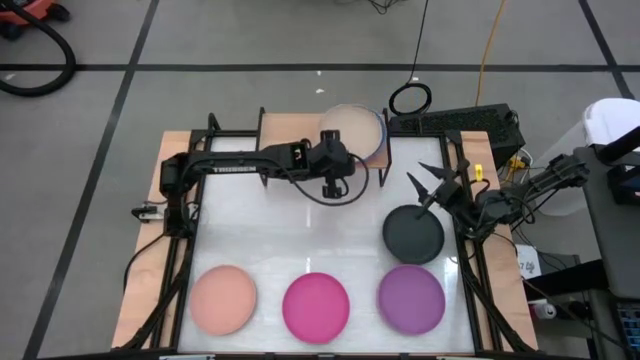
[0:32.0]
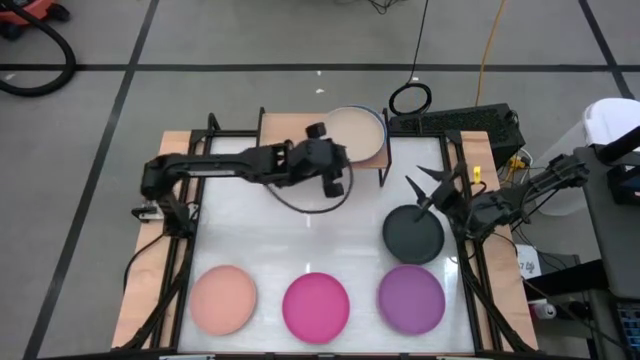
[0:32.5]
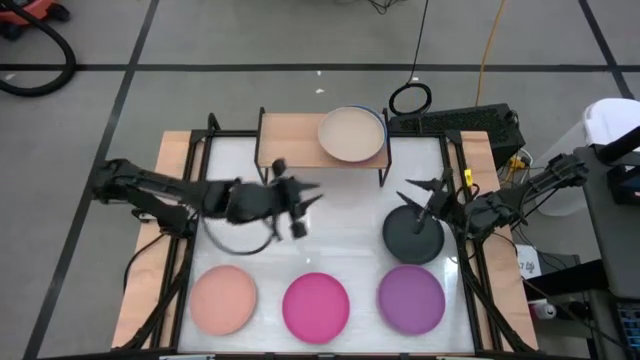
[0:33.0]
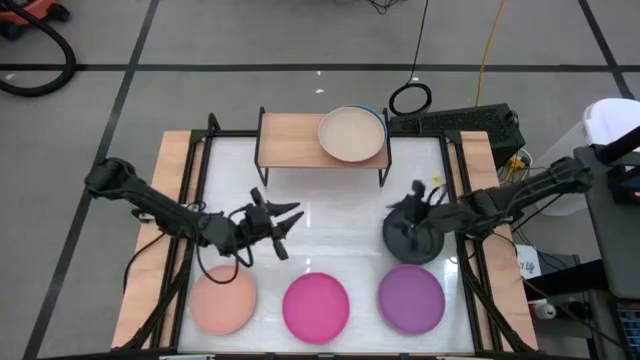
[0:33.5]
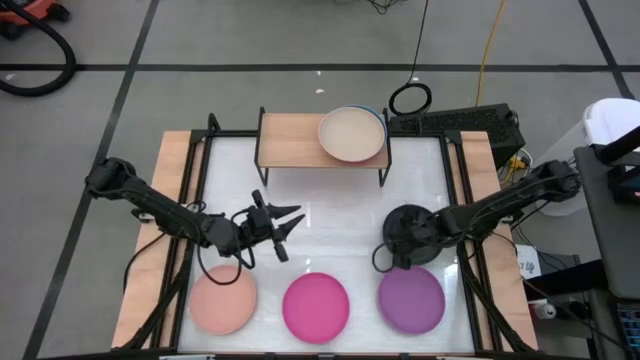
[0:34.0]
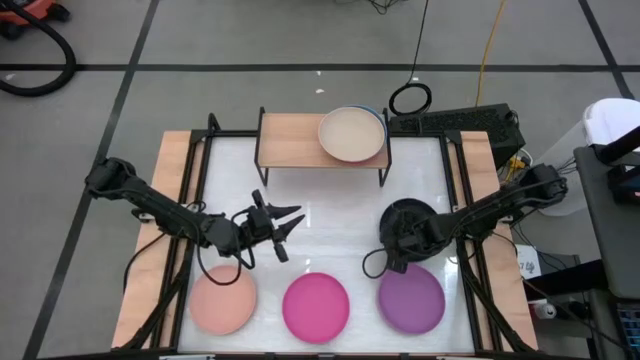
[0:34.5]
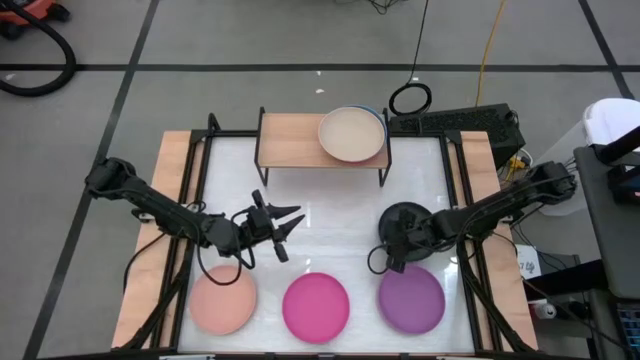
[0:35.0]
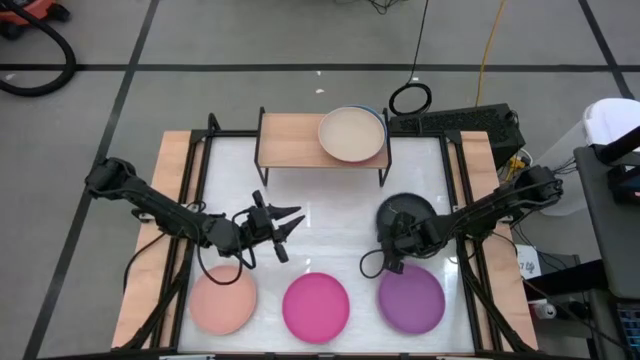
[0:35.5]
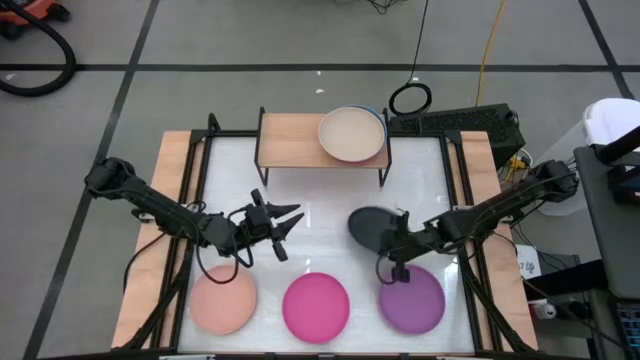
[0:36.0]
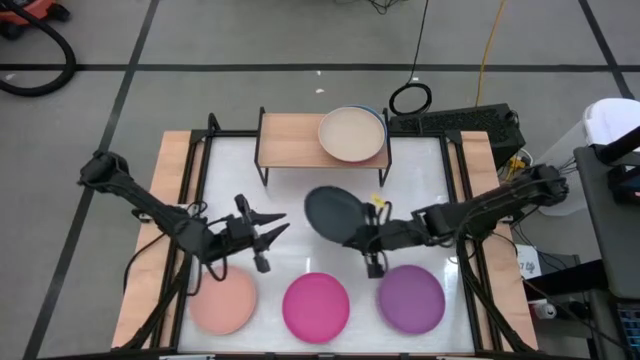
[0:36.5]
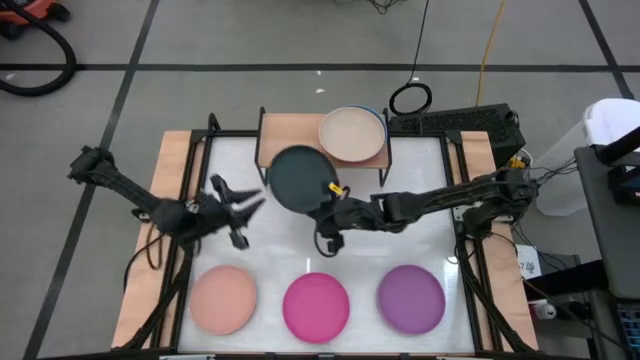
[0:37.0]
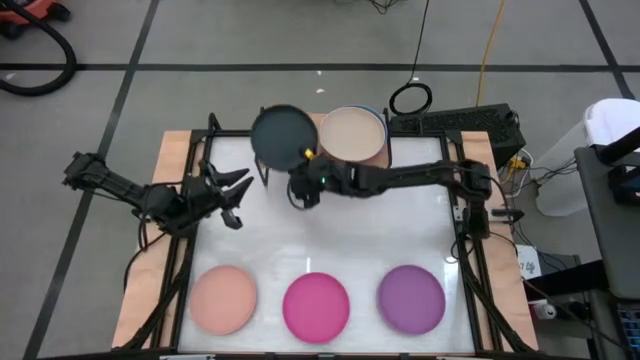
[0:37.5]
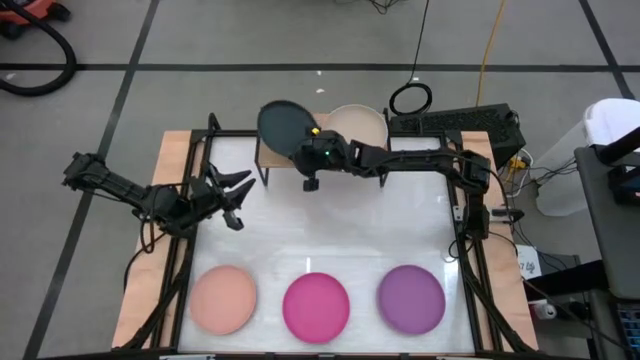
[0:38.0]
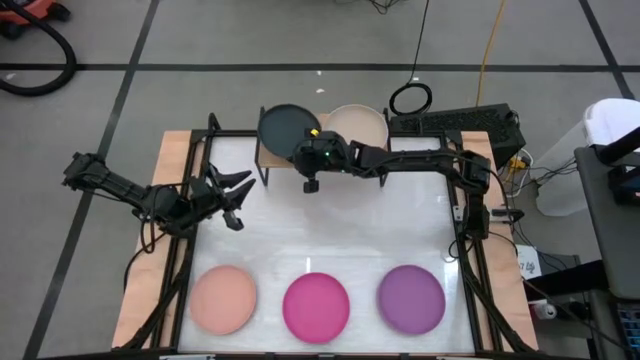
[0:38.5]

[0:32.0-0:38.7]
Task: Place and stack plates onto a shelf
Put the black plate on the shelf

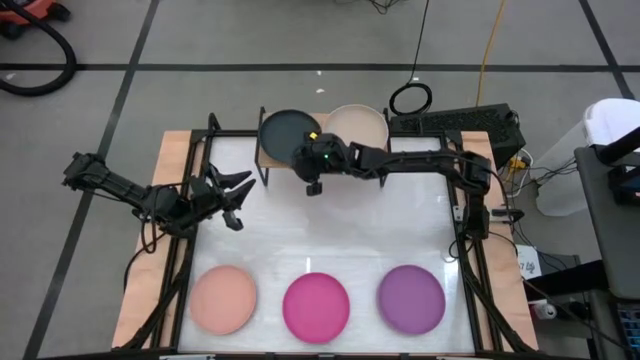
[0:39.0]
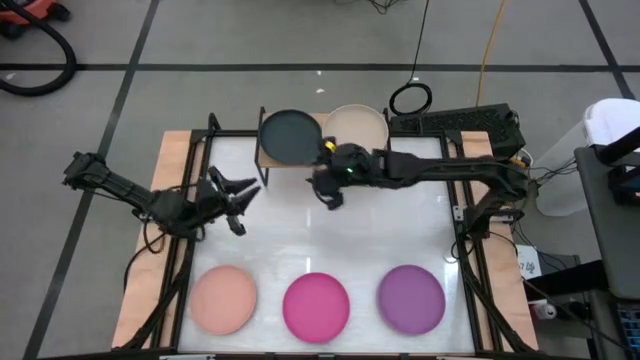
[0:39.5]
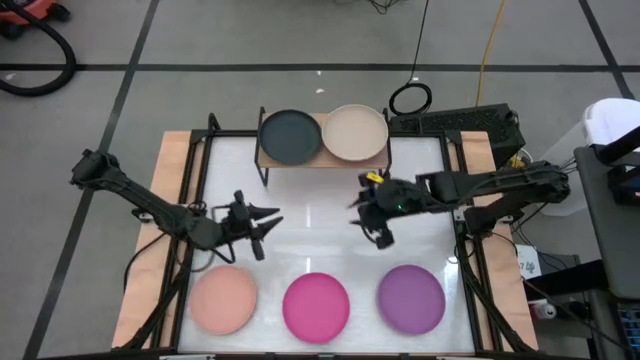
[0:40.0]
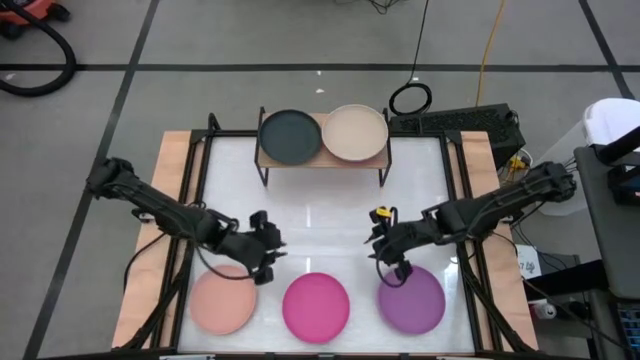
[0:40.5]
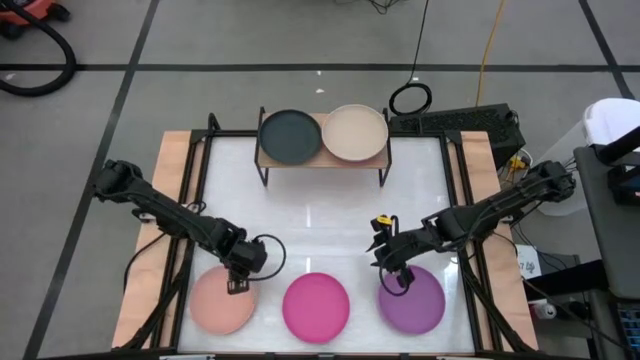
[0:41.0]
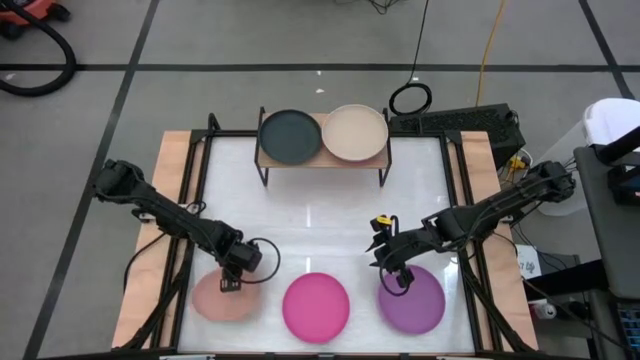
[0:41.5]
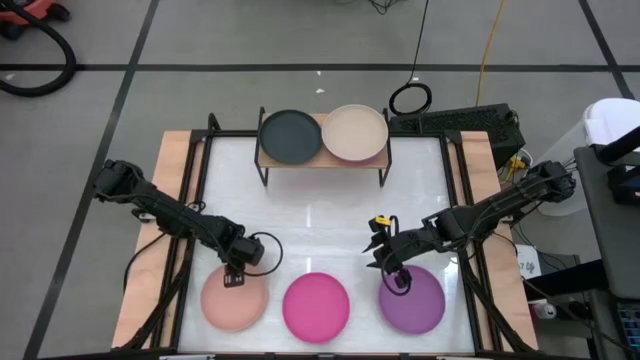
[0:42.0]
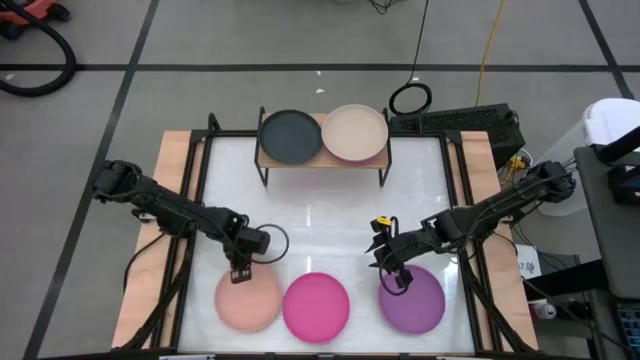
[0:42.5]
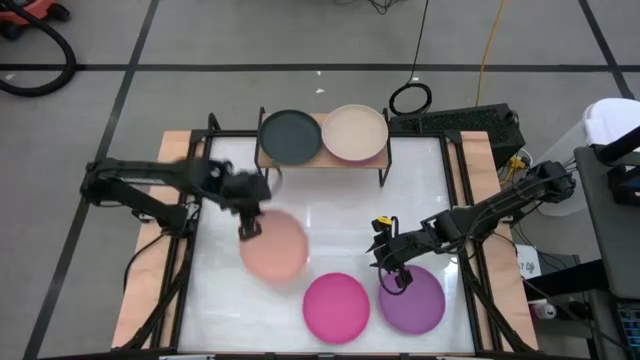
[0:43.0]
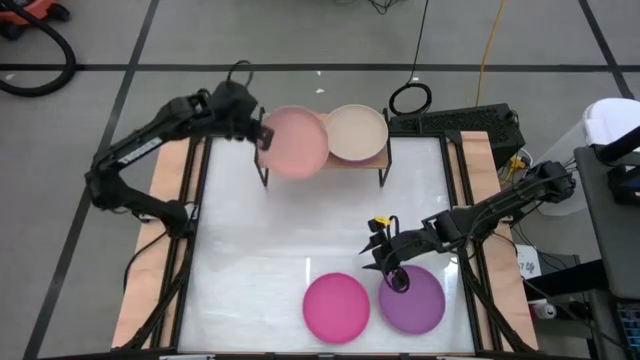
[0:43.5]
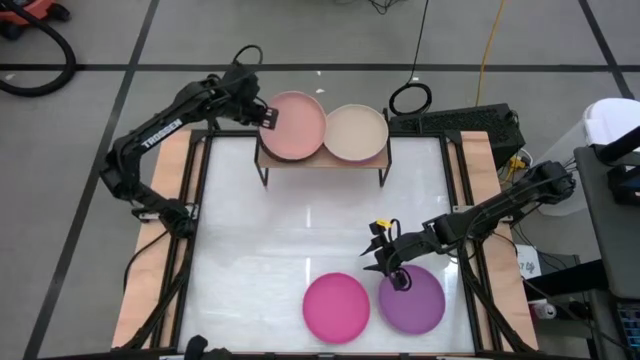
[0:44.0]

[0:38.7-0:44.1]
Stack the light pink plate on the black plate

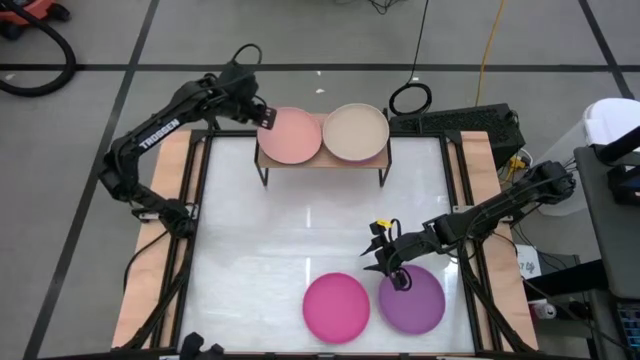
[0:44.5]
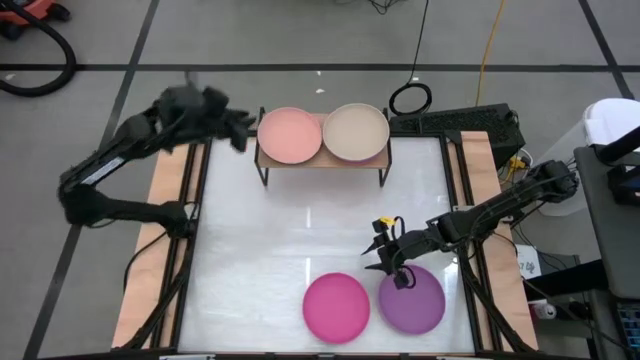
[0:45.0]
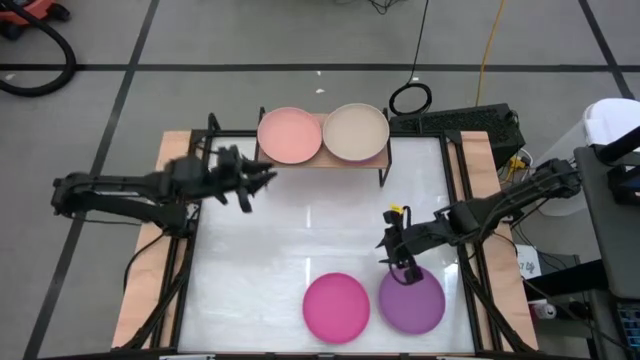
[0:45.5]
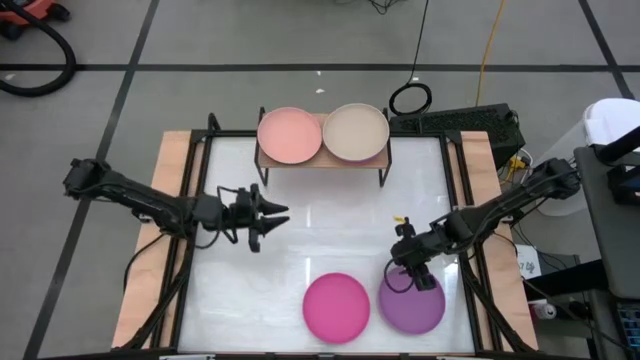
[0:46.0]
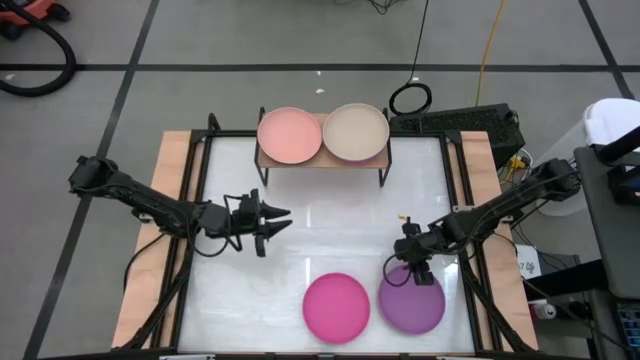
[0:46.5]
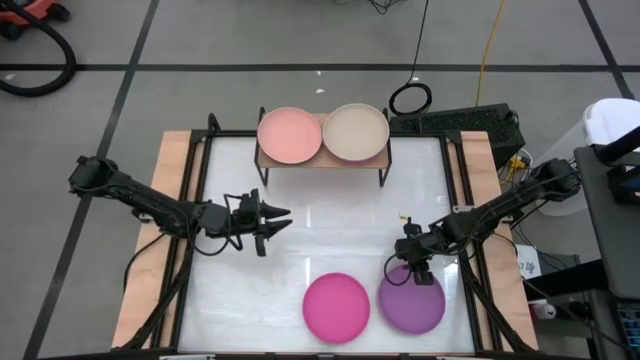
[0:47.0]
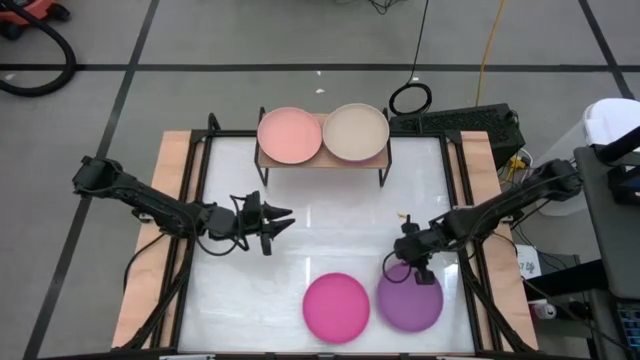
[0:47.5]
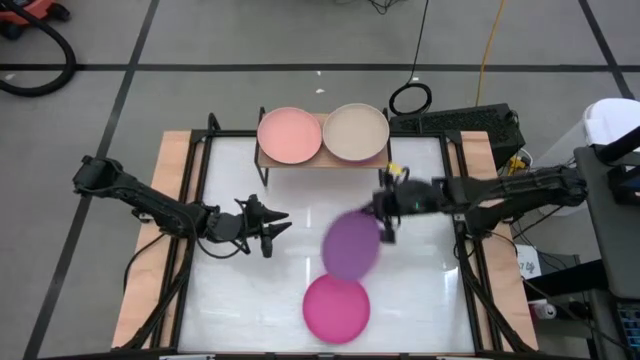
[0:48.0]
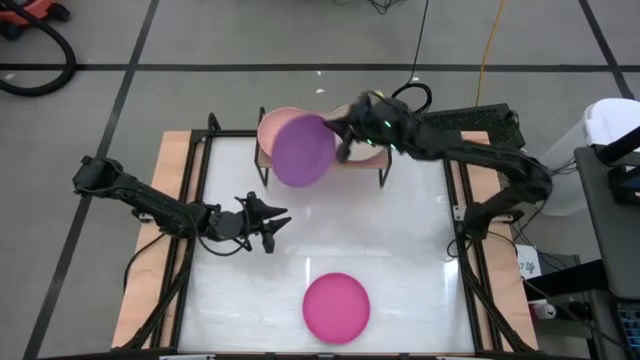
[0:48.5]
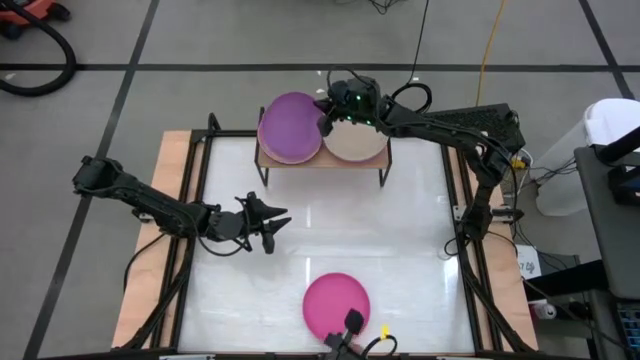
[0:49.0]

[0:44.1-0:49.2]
Stack the purple plate on the light pink

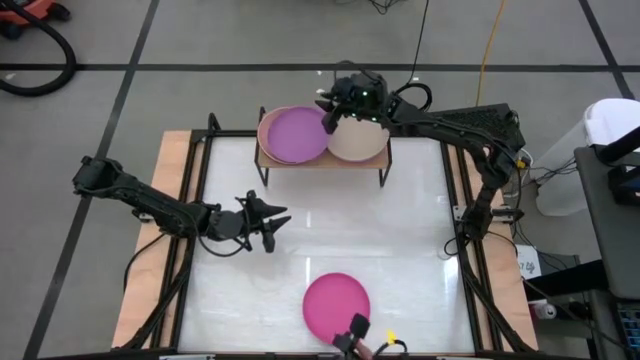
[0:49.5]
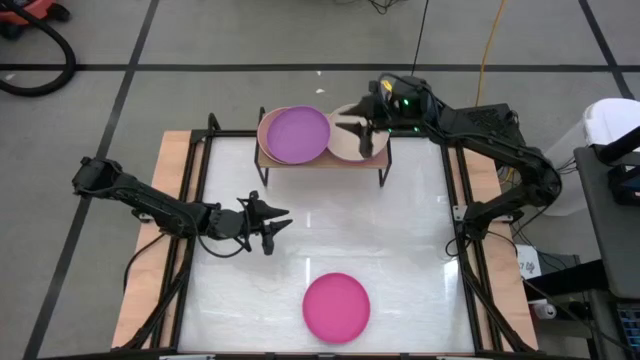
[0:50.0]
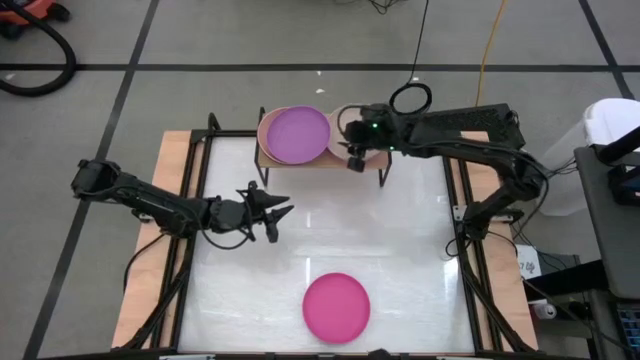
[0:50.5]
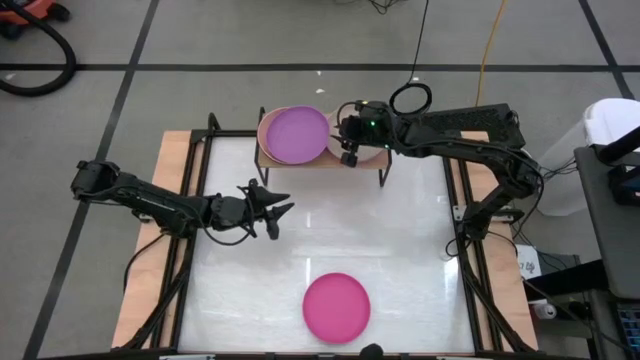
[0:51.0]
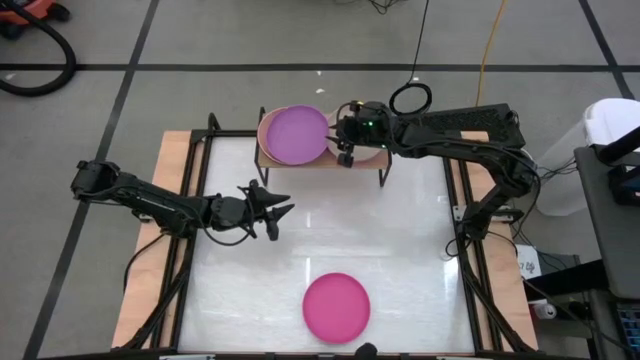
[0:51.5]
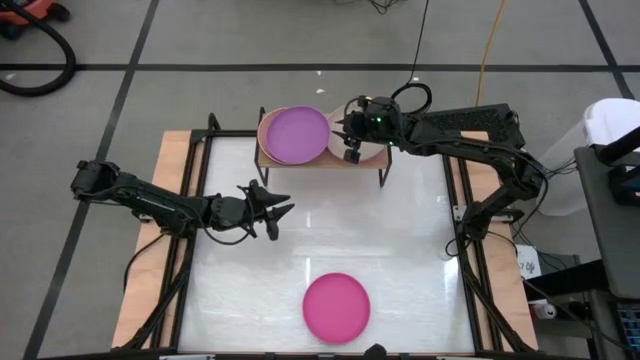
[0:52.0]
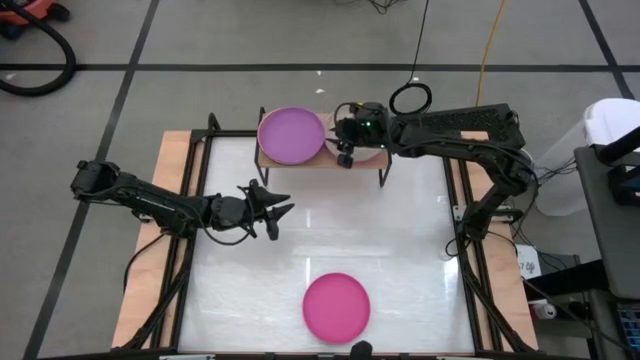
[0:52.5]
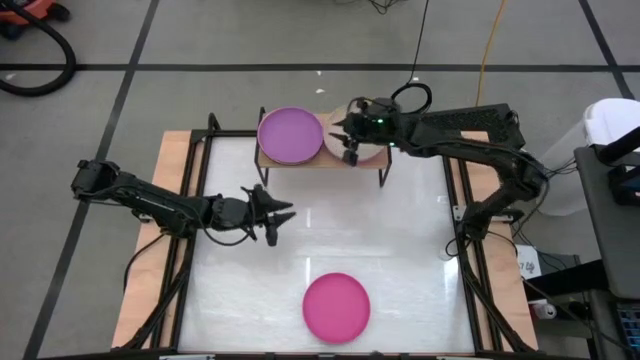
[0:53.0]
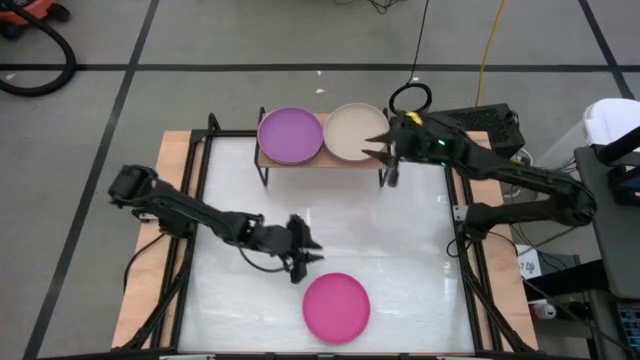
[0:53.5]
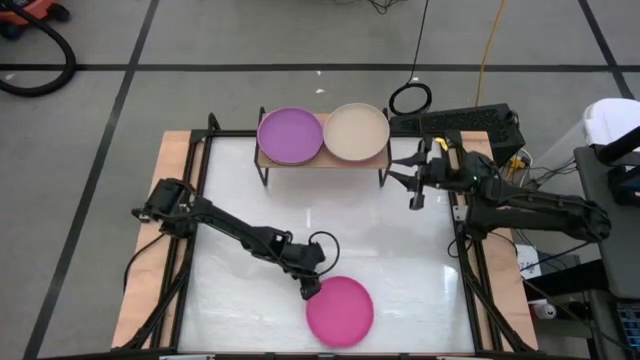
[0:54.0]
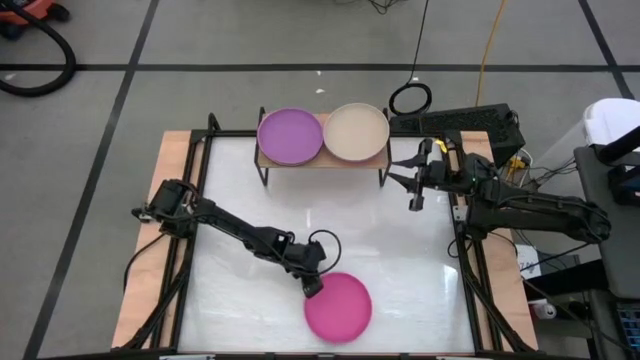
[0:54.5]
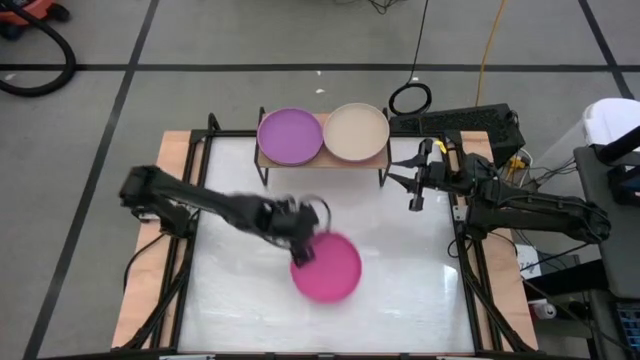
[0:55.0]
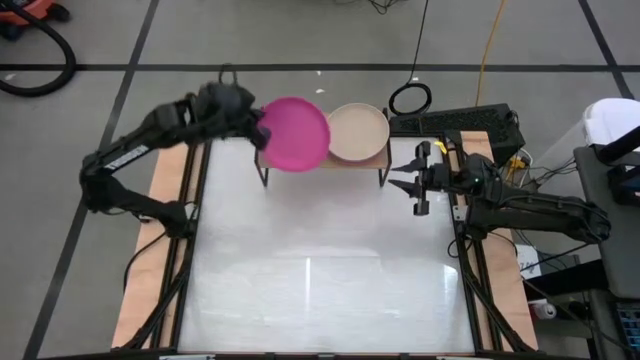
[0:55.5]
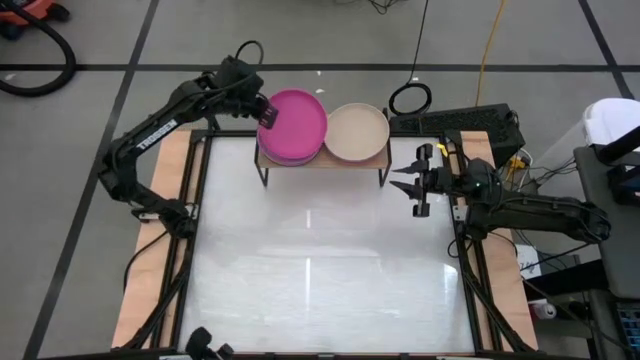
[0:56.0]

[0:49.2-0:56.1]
Stack the pink plate on the purple plate
